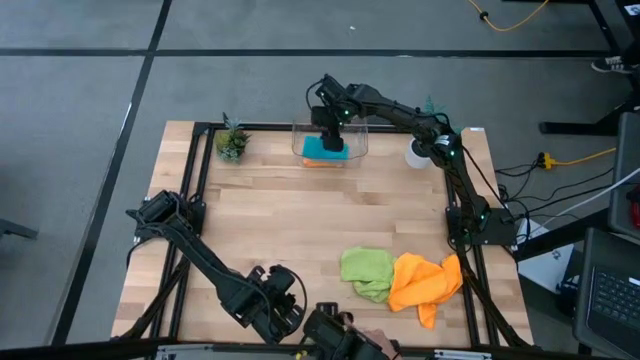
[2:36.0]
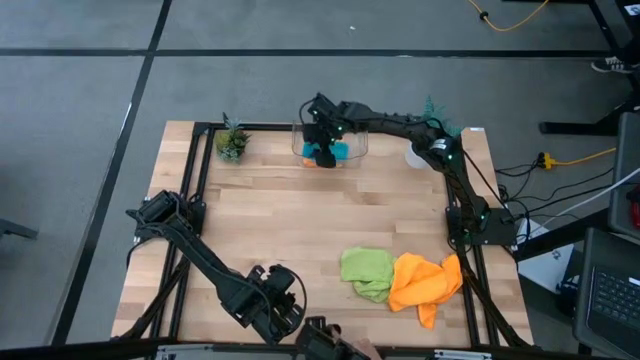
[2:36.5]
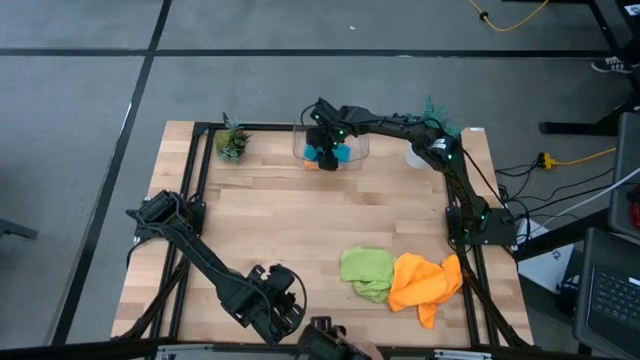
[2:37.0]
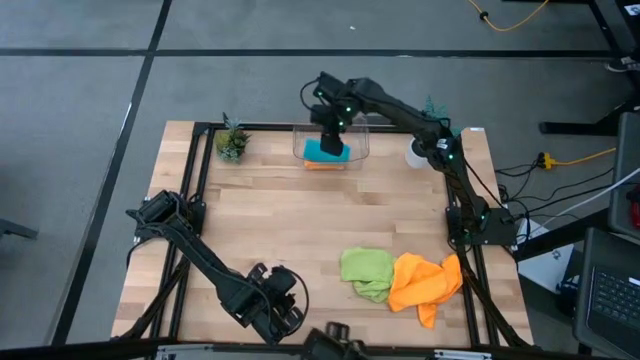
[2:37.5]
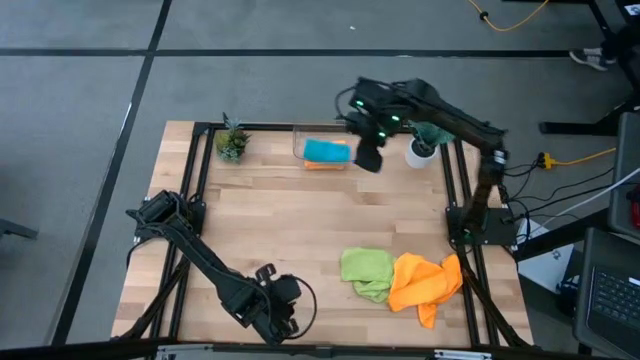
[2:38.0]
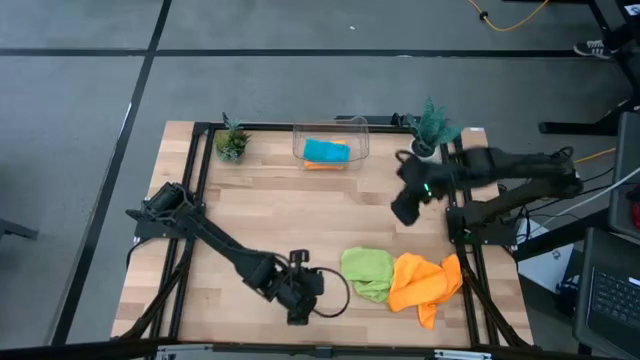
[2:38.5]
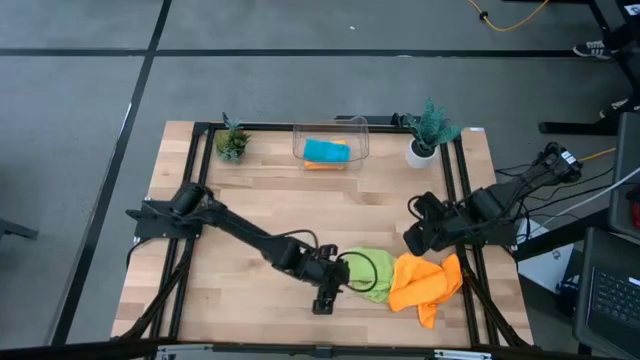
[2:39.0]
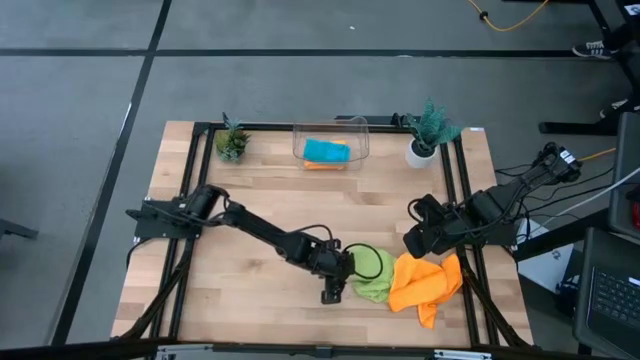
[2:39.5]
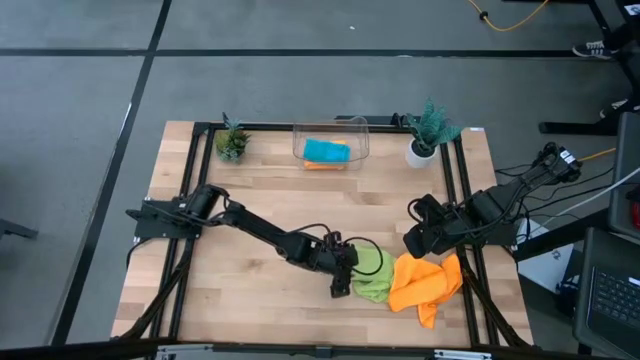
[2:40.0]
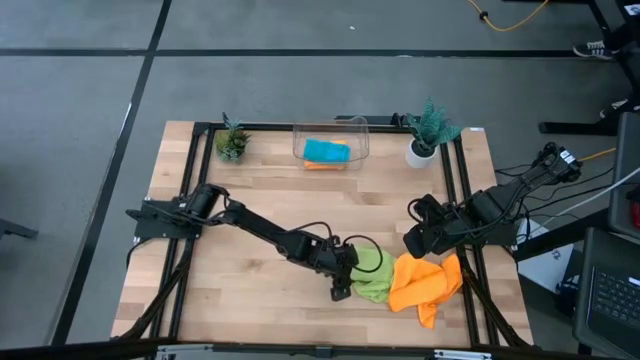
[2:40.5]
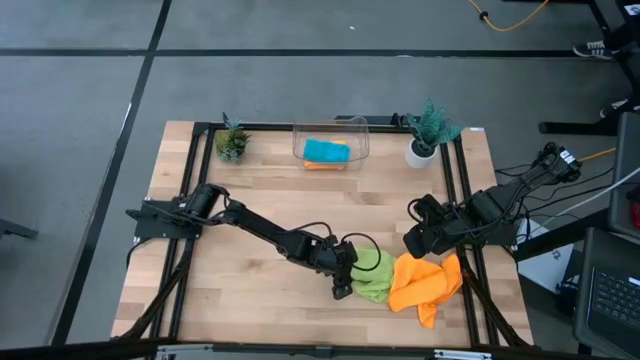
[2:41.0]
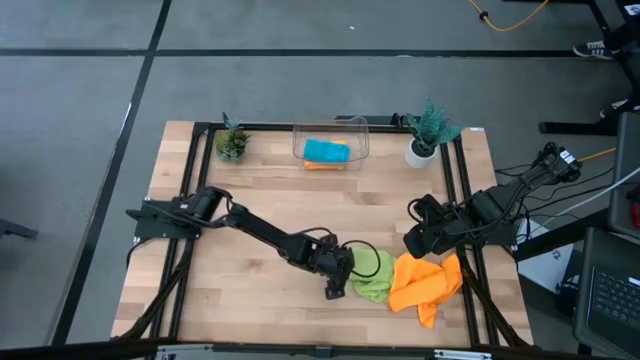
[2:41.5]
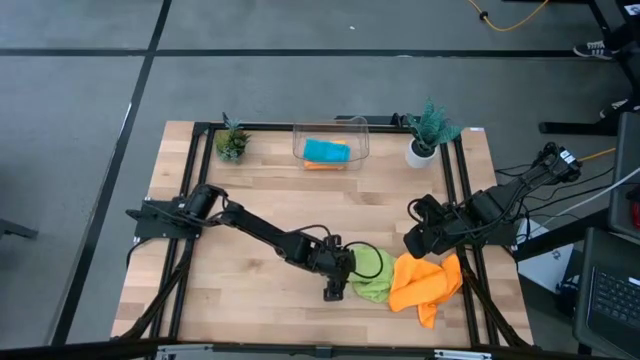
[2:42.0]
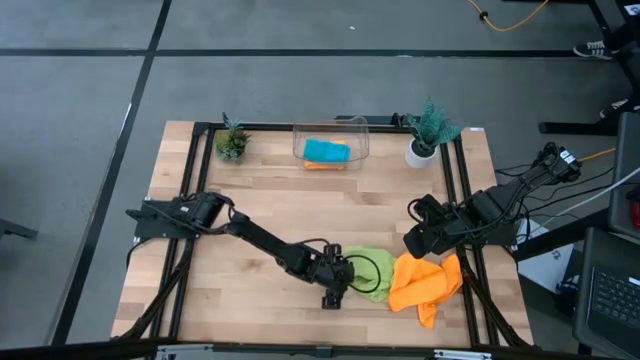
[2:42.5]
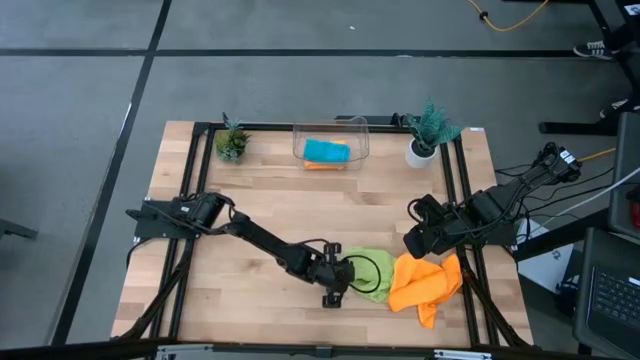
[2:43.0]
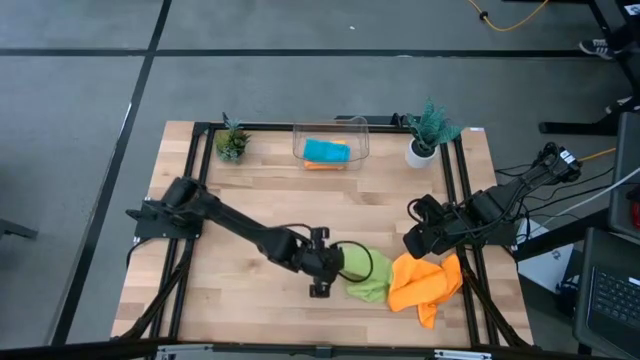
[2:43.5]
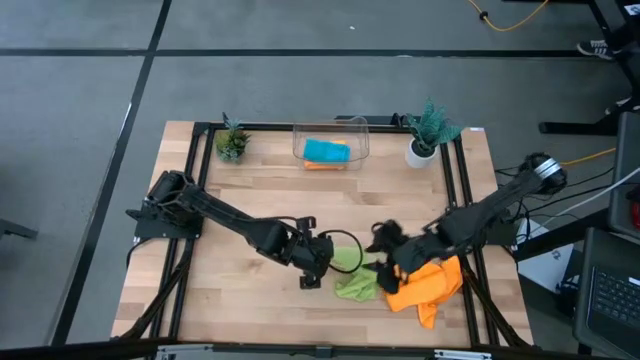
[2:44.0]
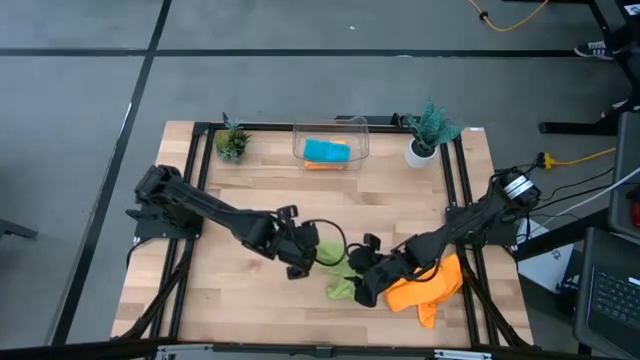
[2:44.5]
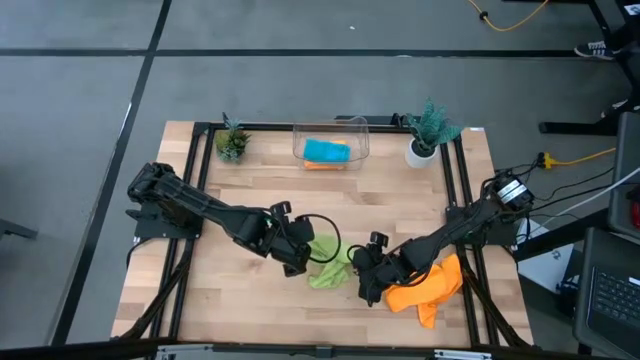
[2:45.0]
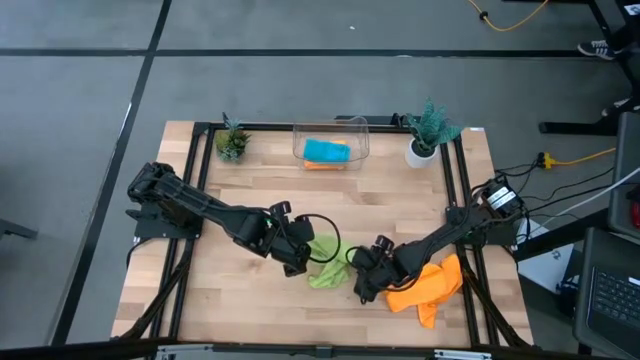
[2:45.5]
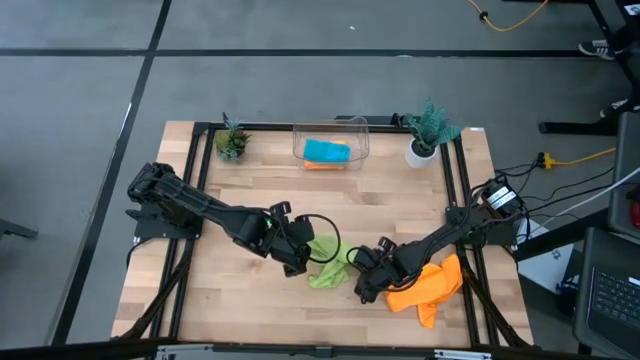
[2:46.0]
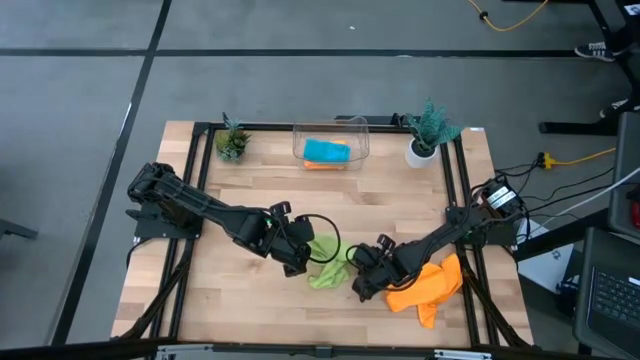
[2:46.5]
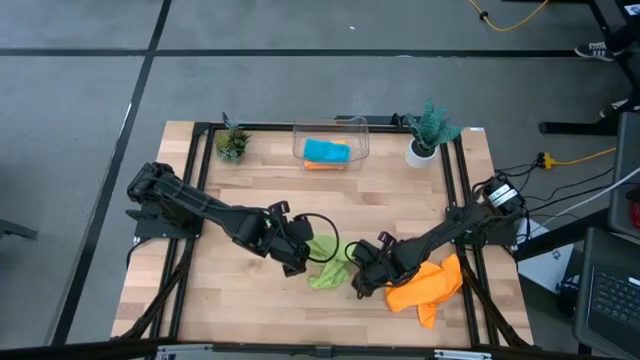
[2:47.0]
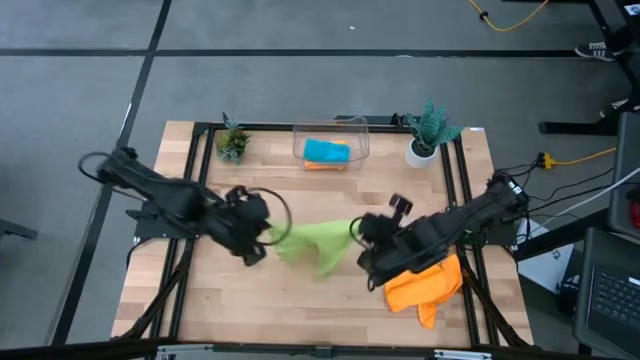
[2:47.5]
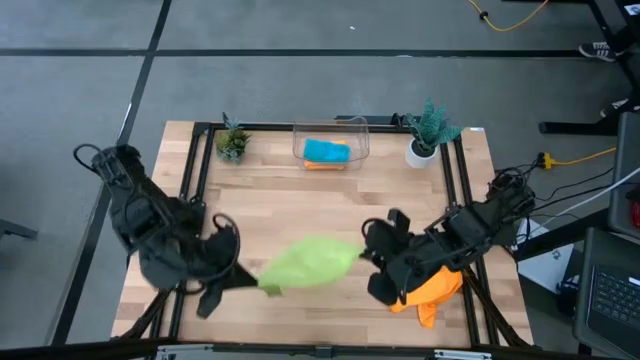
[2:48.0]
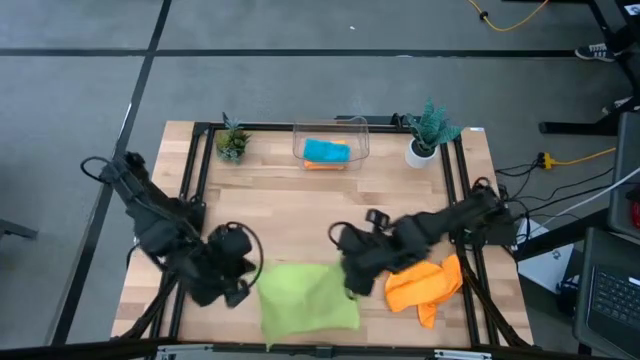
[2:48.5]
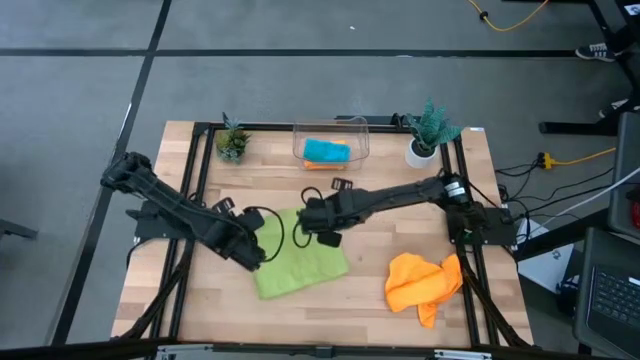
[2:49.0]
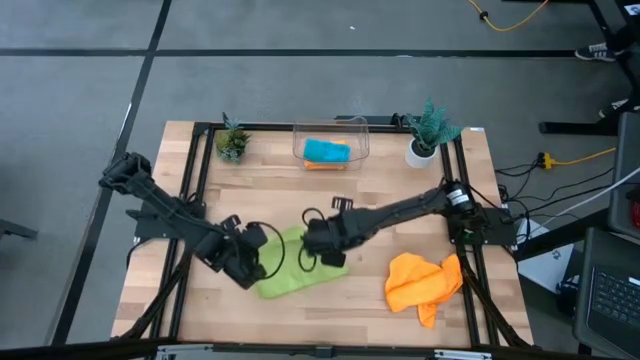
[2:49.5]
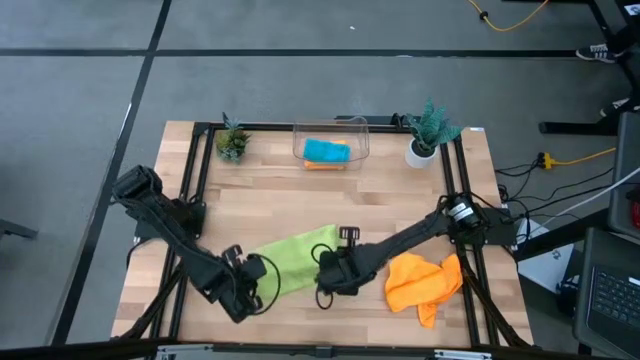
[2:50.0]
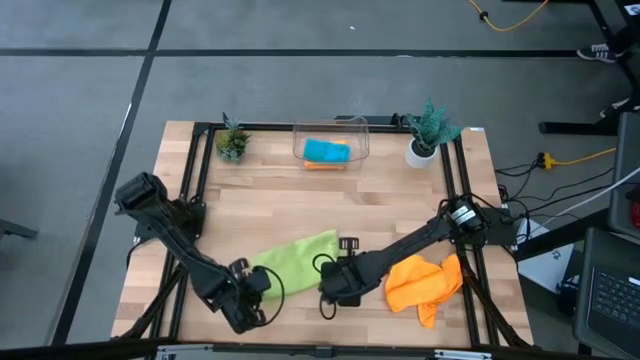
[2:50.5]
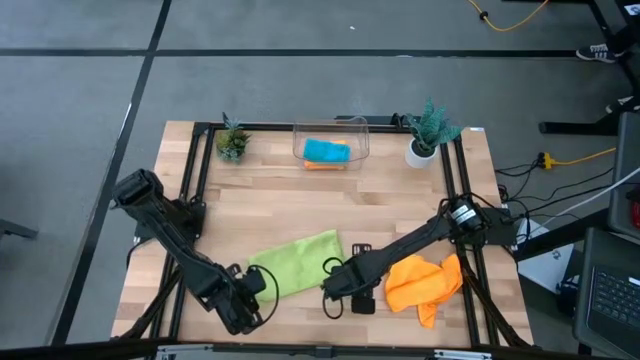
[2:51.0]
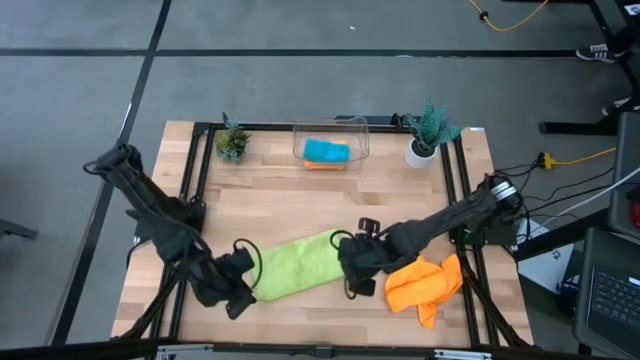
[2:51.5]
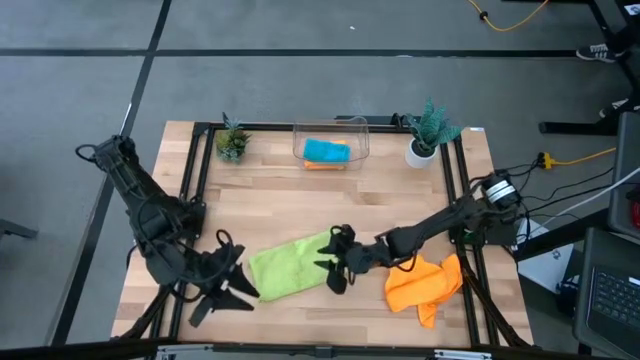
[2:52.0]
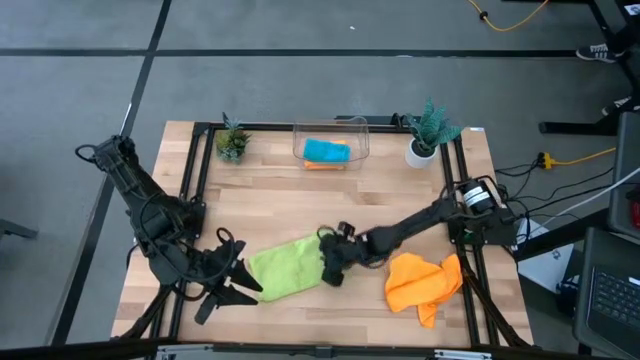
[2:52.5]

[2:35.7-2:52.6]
Task: Fold microfiber towels
Fold the green towel

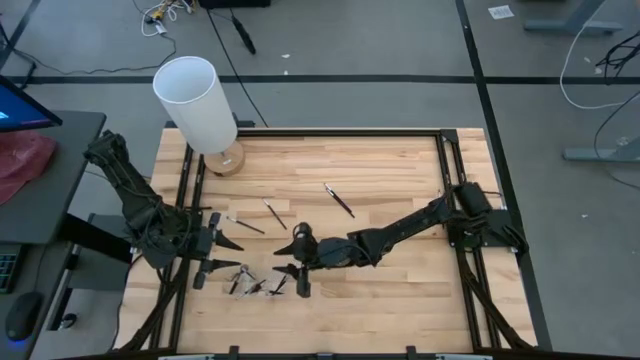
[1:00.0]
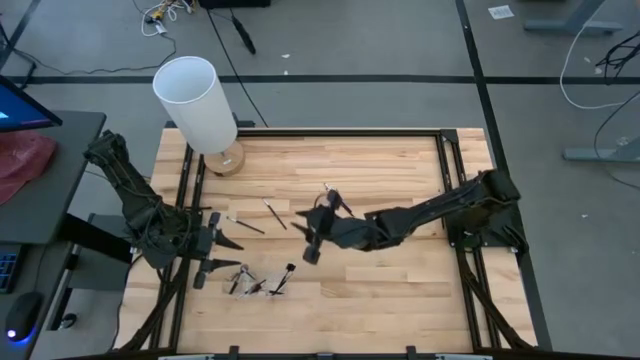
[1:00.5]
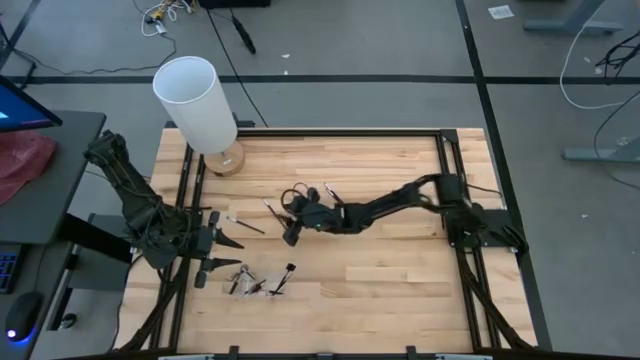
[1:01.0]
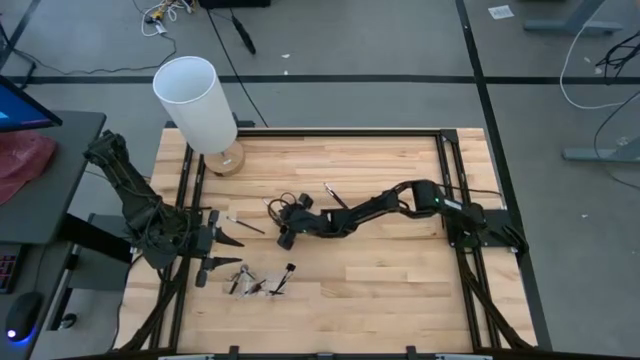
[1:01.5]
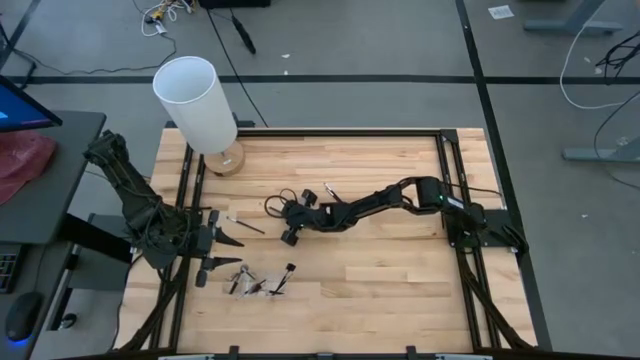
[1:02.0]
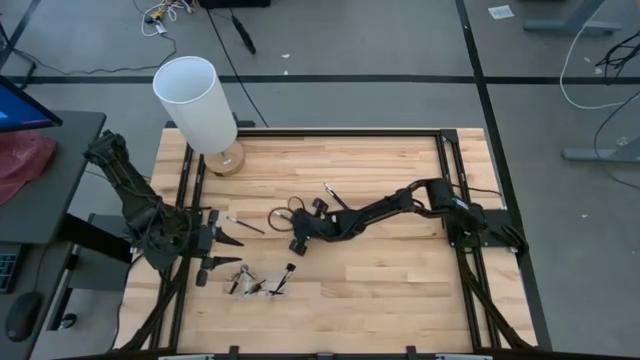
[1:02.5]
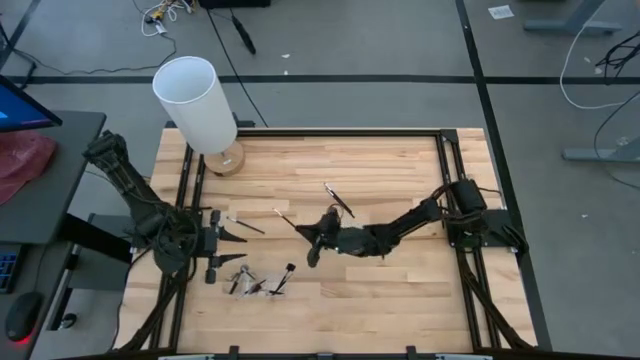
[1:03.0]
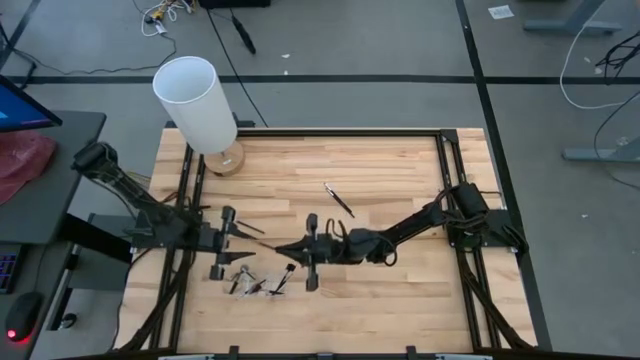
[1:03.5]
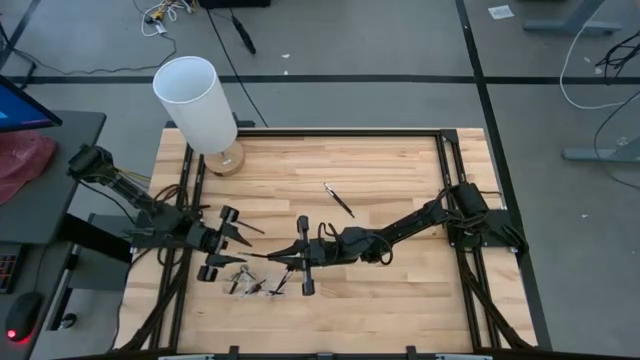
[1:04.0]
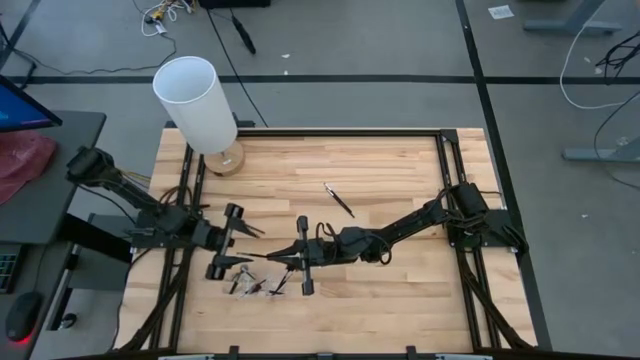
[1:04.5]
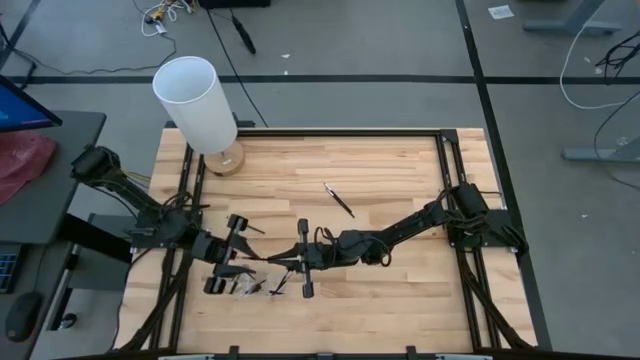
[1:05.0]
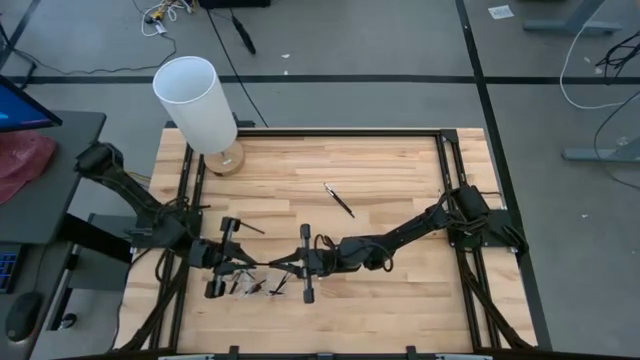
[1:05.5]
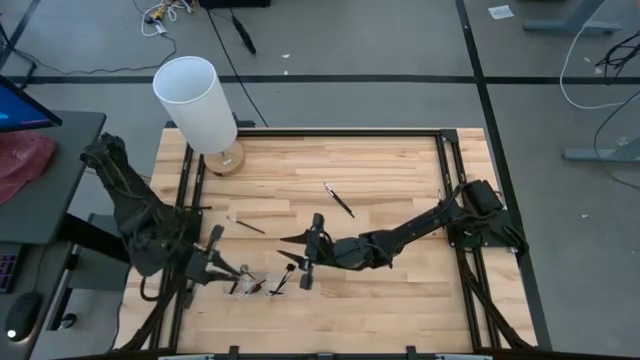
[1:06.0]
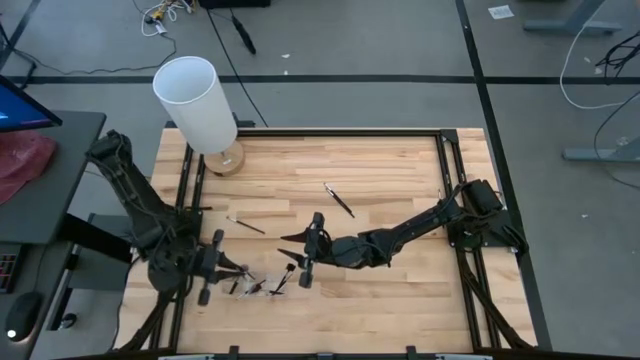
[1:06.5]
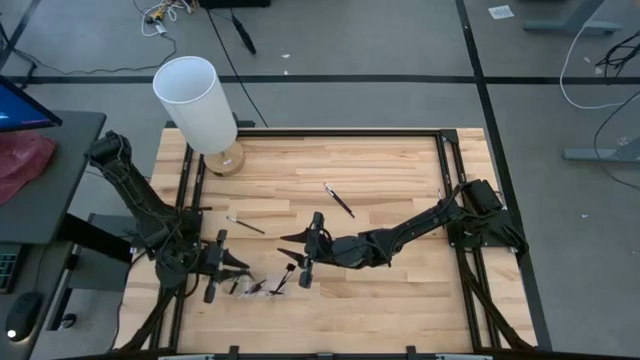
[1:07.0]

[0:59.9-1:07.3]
Task: Put items in baskets/containers
Put the eyeshadow brush into the transparent organizer
